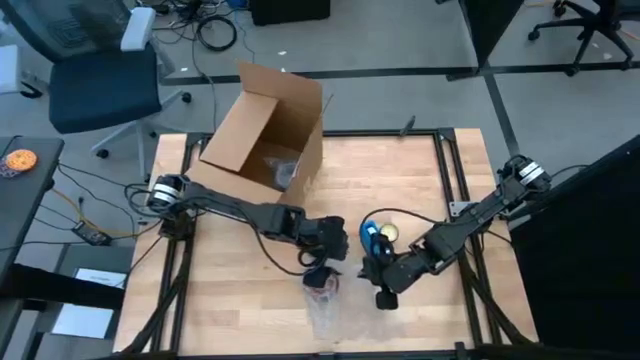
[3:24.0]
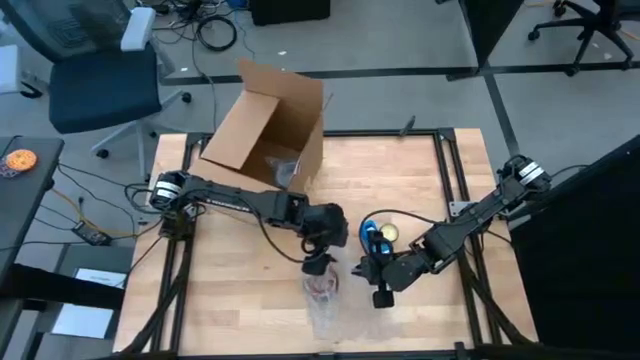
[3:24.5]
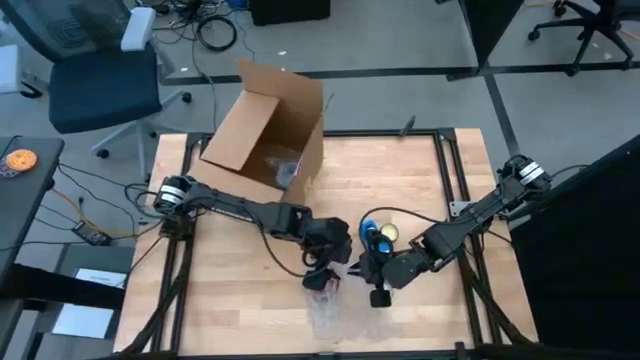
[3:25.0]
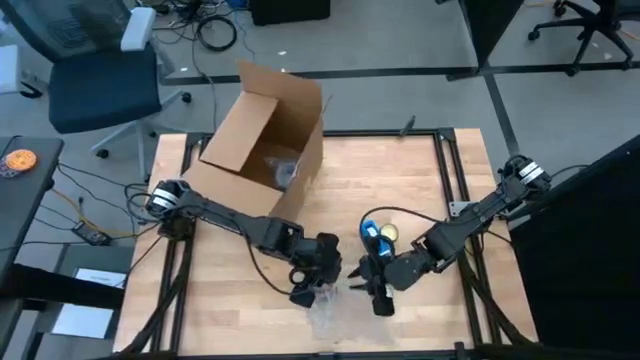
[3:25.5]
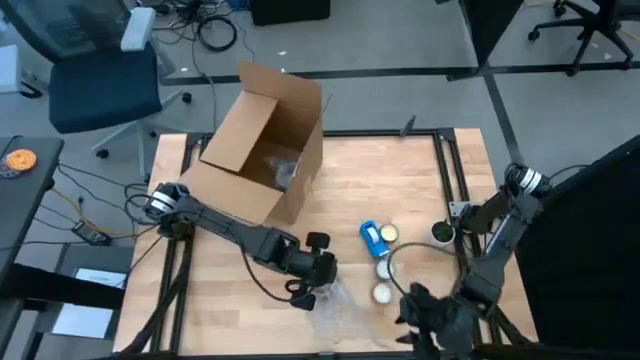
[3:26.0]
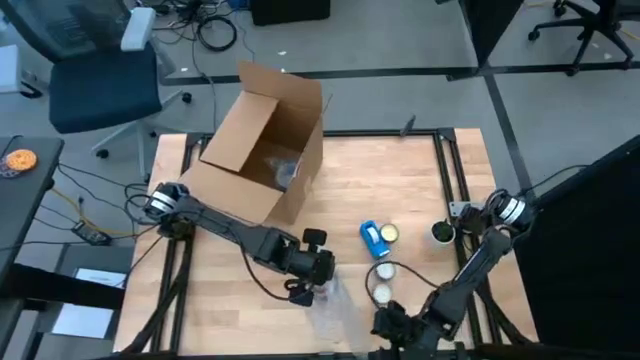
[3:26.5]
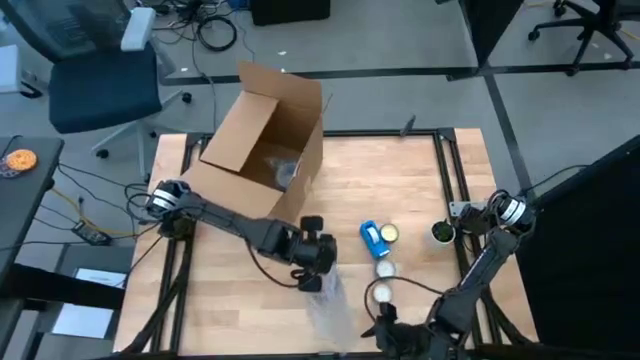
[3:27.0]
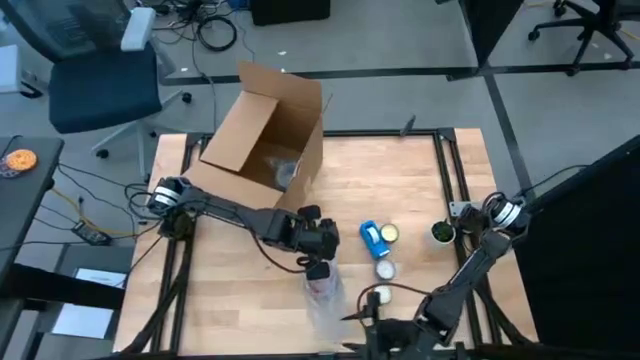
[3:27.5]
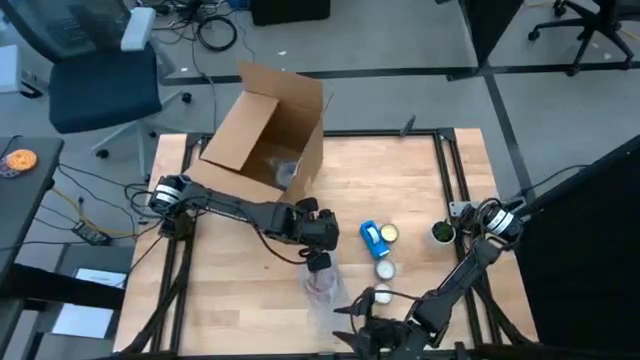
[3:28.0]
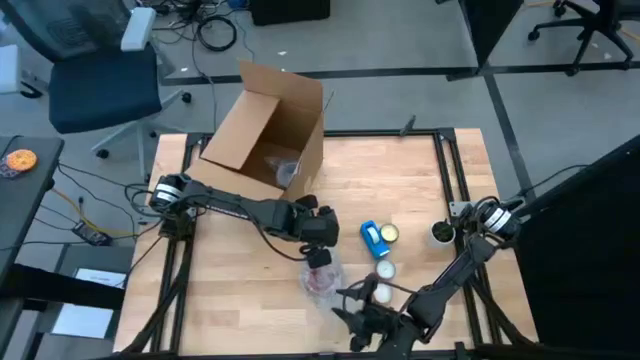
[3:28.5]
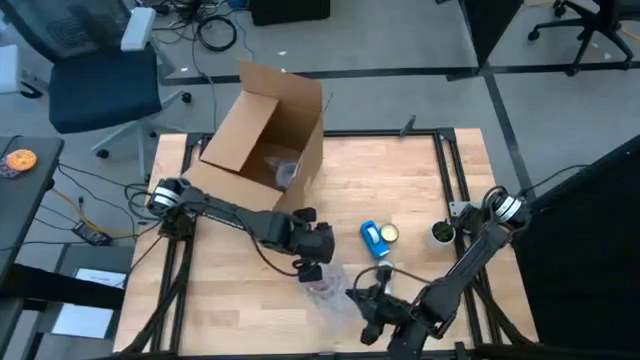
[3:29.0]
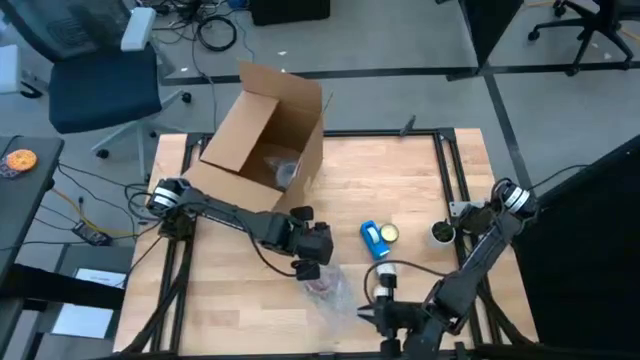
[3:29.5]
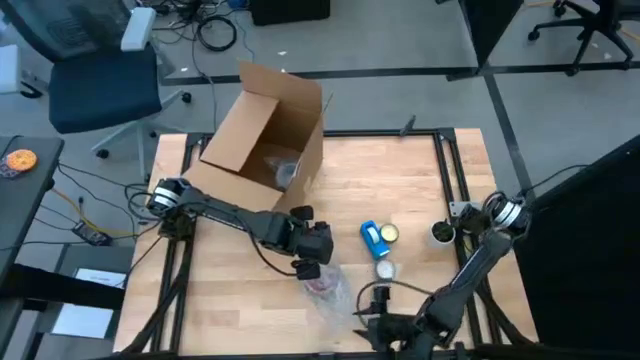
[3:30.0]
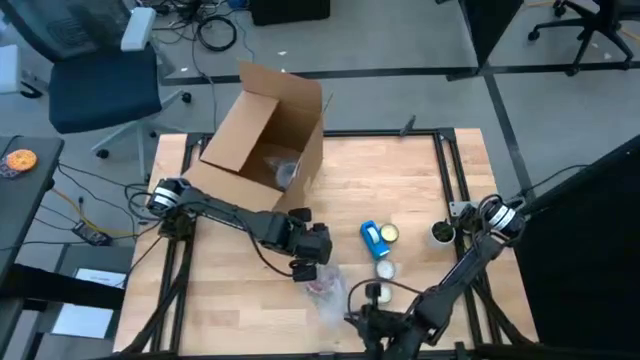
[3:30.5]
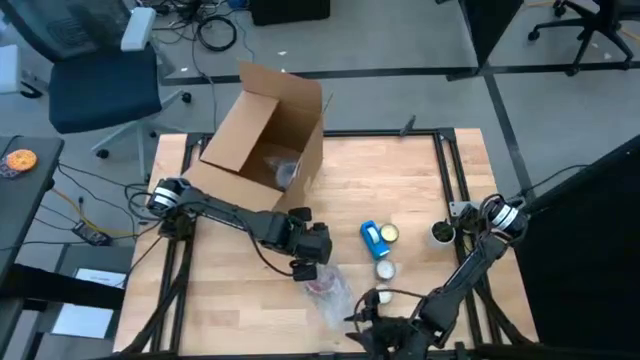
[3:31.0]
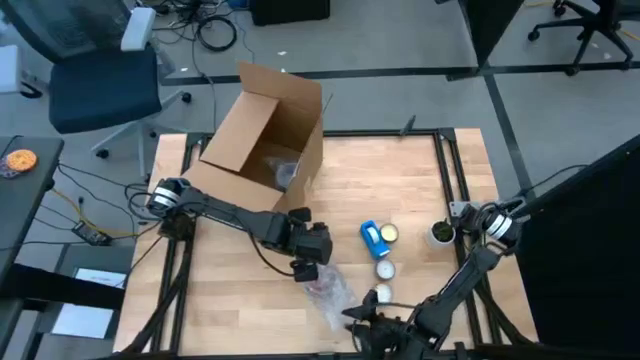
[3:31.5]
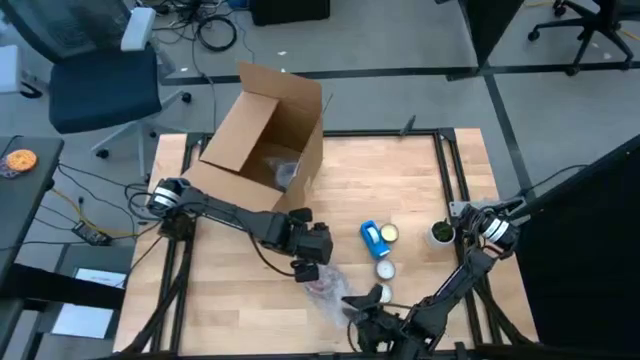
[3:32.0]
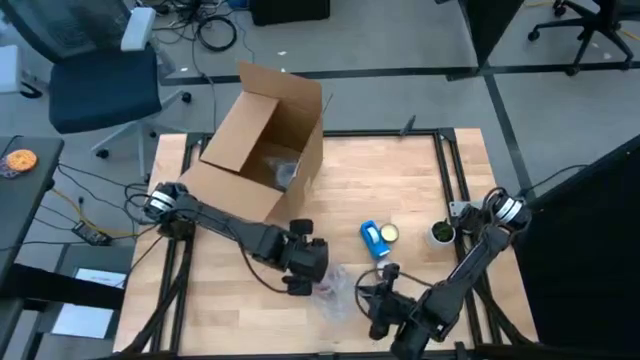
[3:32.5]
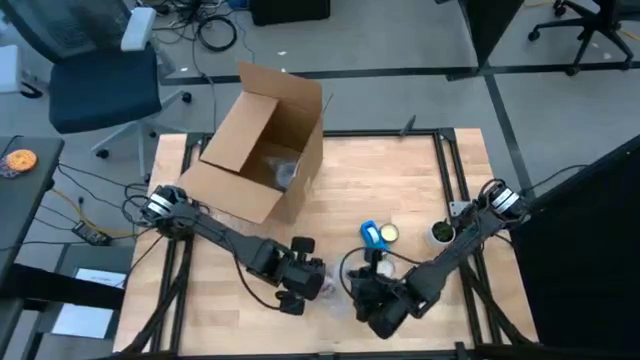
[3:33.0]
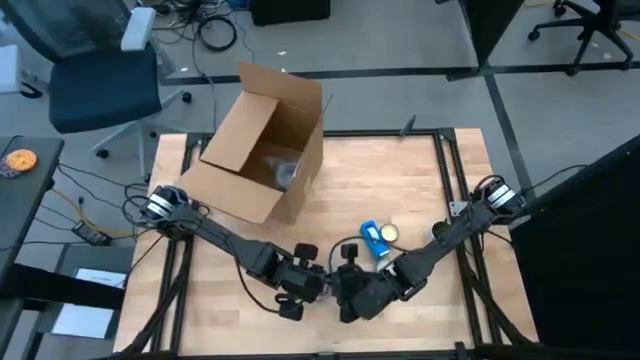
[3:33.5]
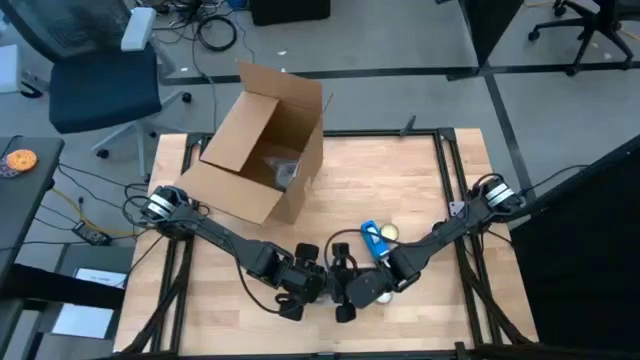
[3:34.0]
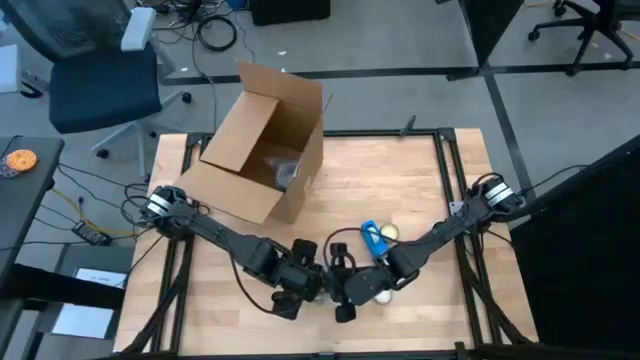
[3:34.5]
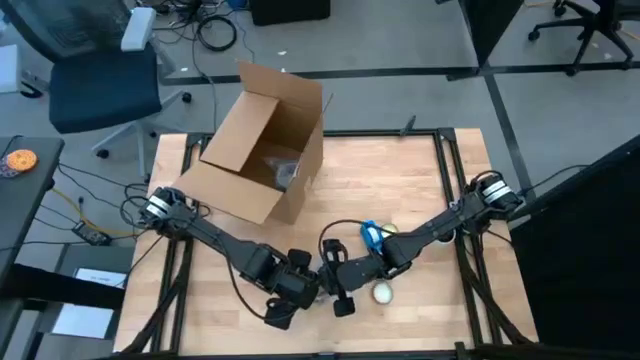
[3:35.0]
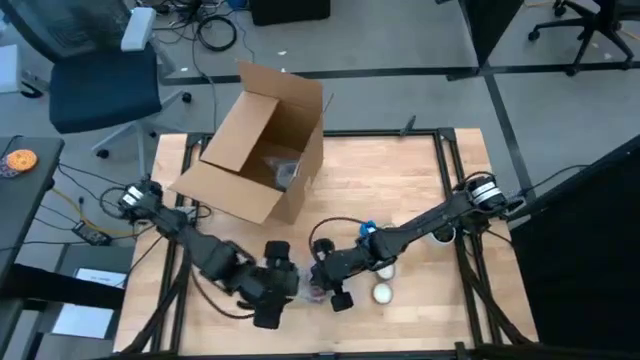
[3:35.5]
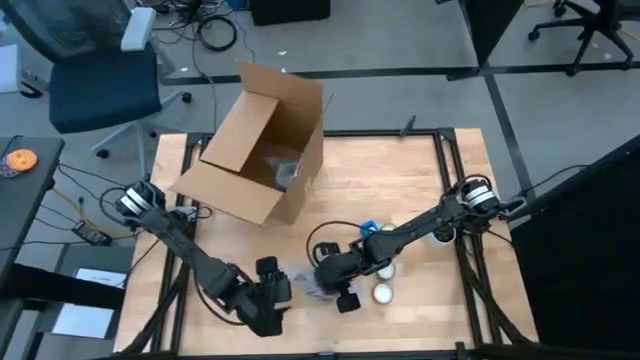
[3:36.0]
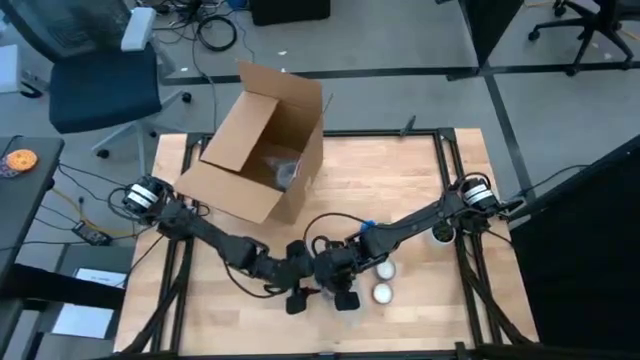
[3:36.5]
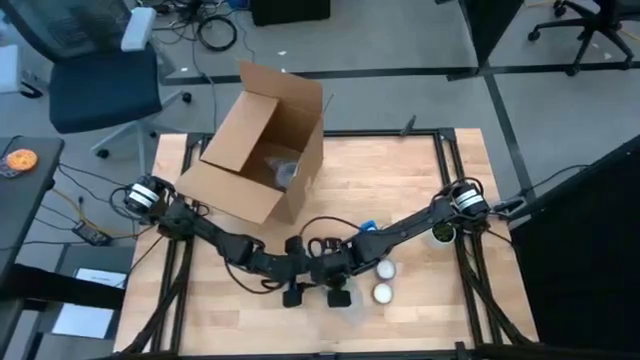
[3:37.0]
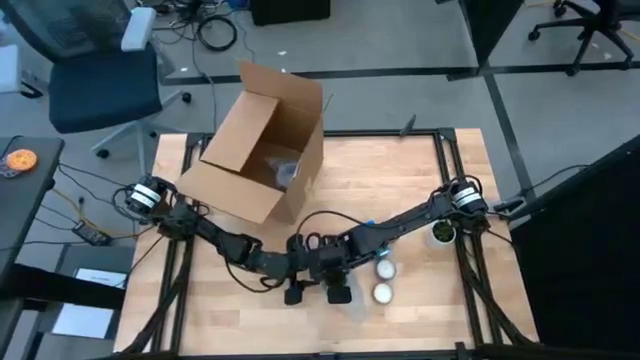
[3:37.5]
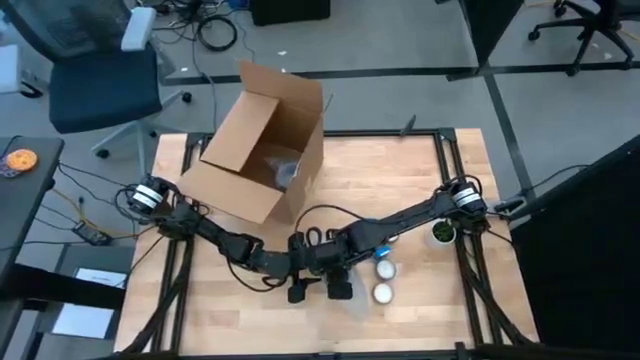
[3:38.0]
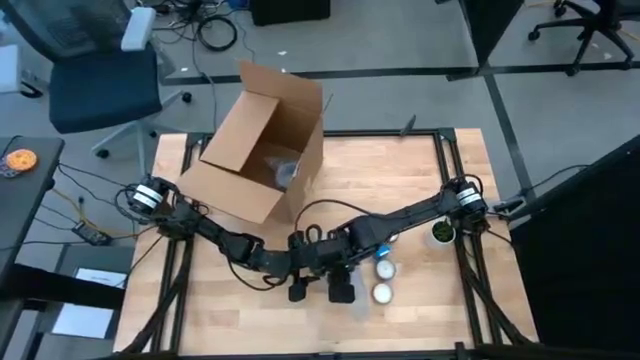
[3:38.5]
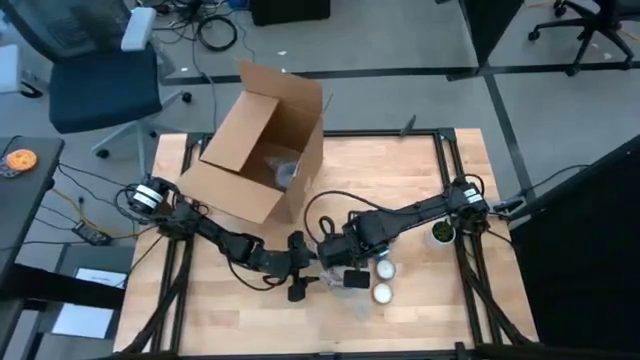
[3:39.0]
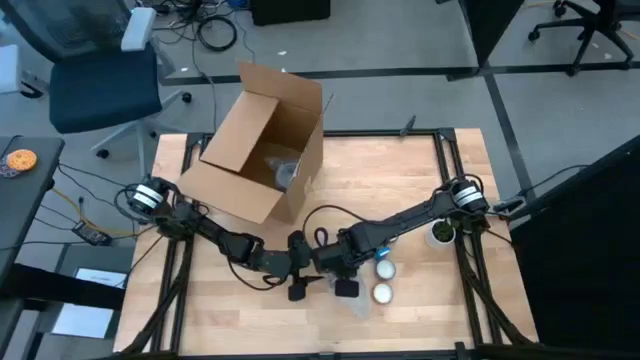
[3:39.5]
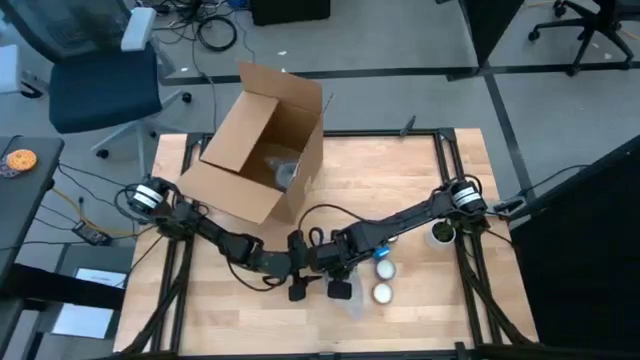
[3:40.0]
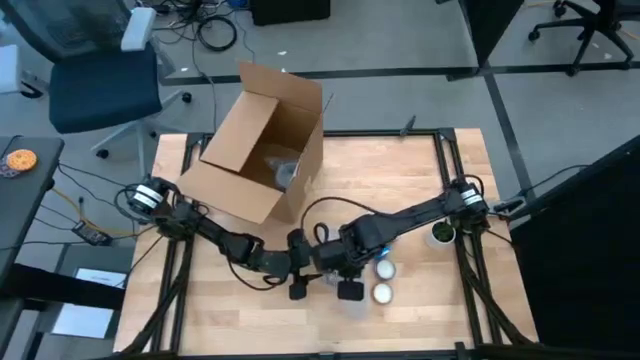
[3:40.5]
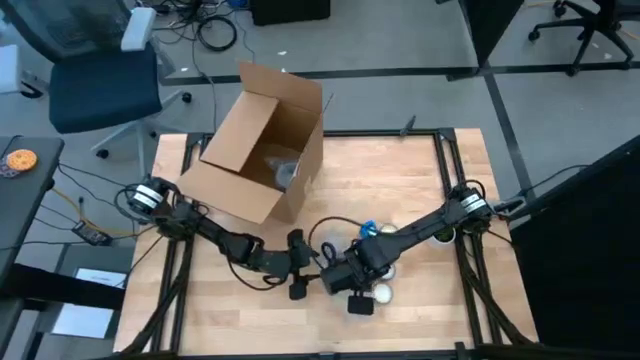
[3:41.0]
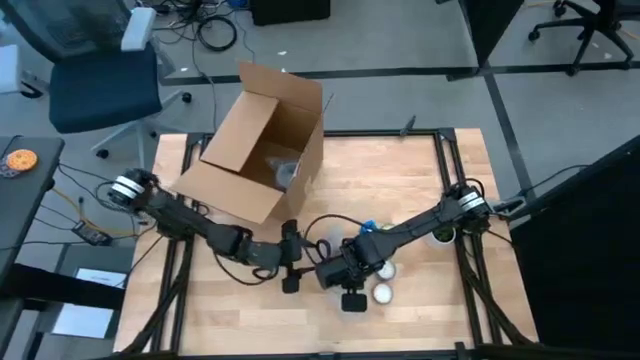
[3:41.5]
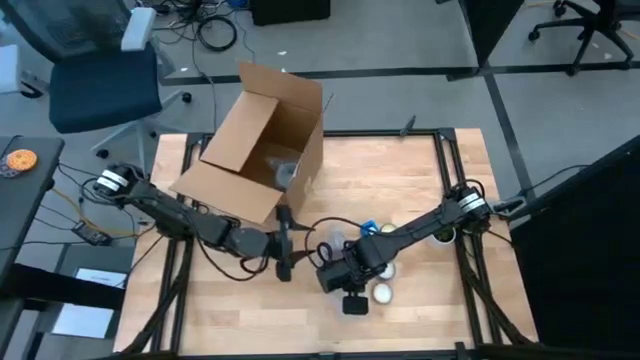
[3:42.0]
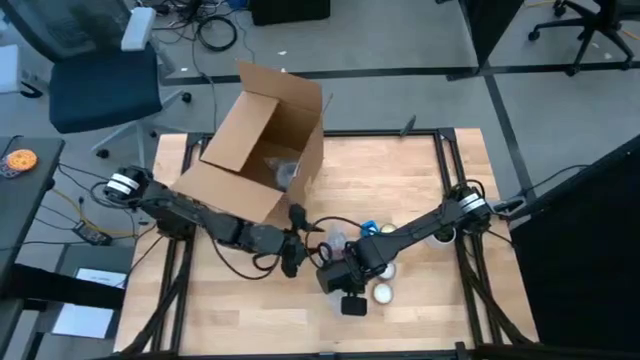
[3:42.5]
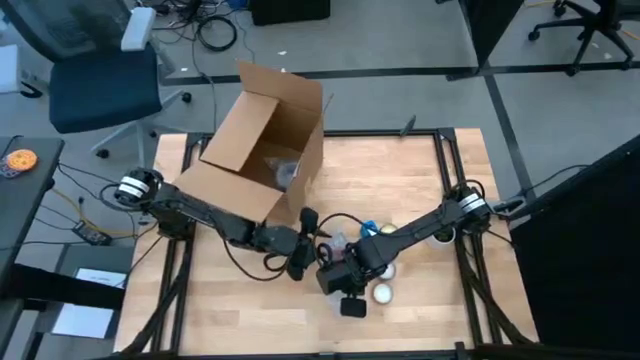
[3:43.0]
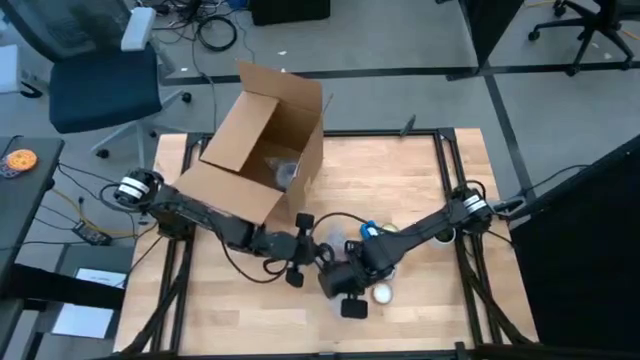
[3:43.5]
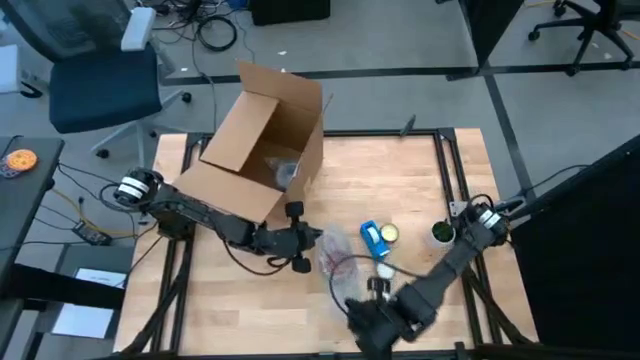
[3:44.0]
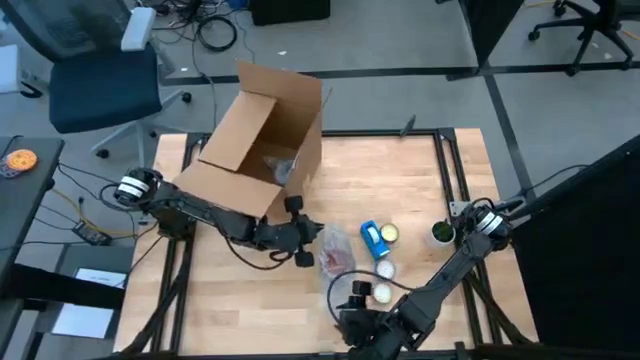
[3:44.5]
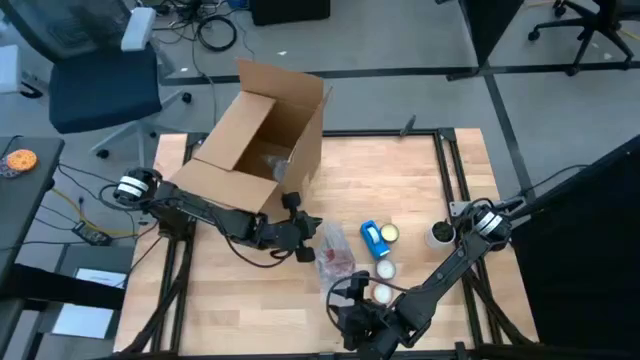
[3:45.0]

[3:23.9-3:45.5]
Task: wrap mug
Wrap the mug with the bubble wrap
